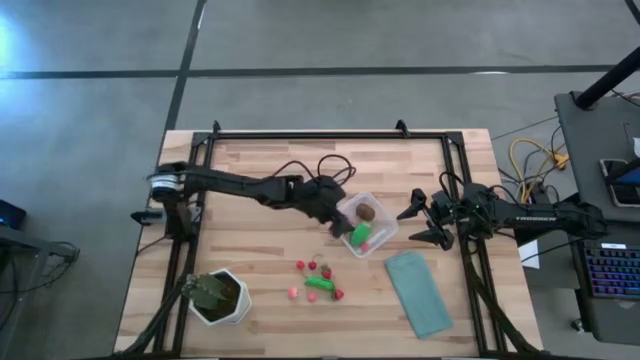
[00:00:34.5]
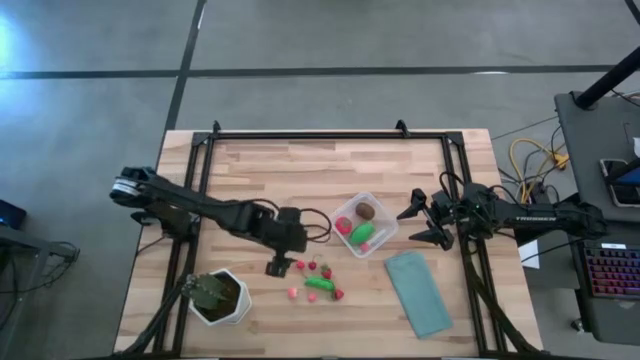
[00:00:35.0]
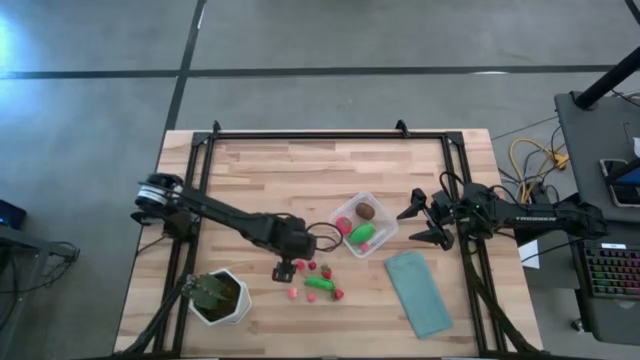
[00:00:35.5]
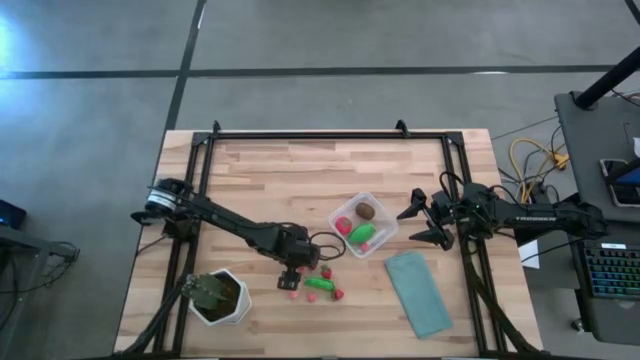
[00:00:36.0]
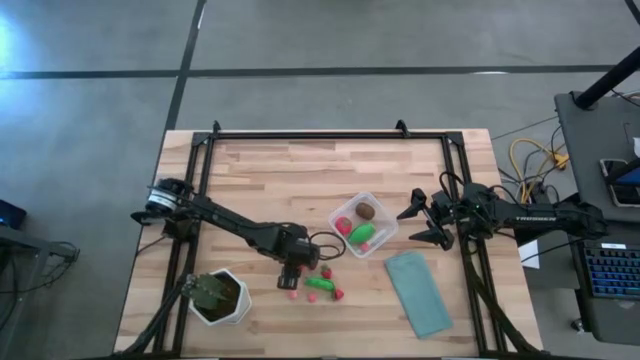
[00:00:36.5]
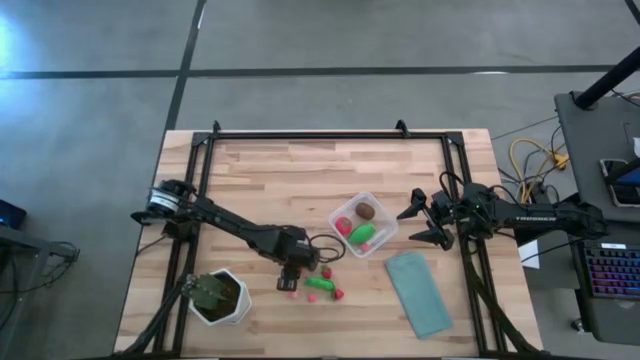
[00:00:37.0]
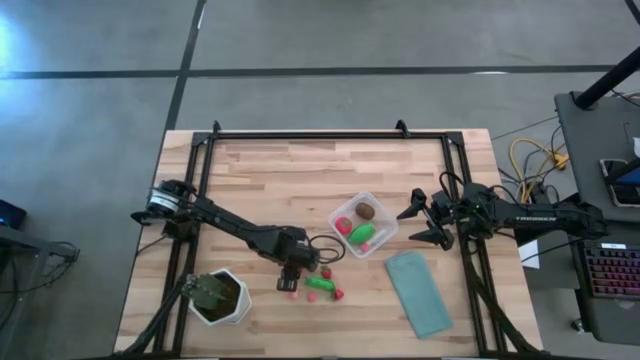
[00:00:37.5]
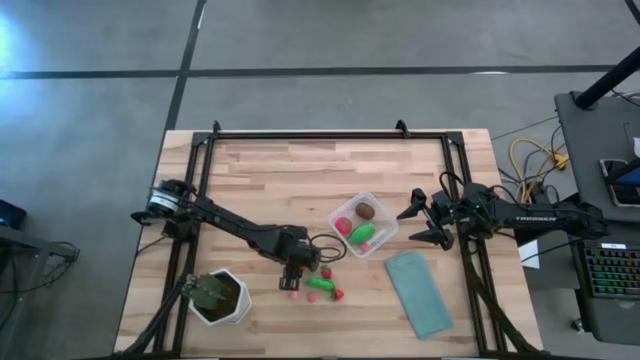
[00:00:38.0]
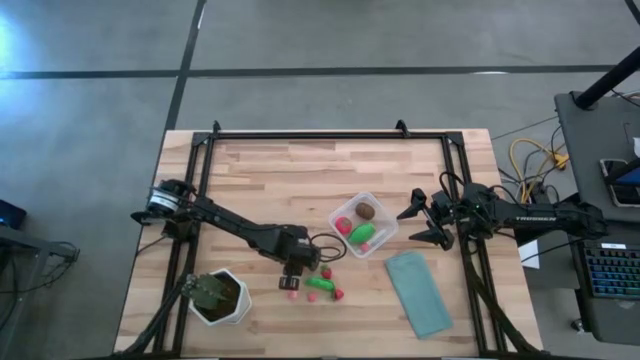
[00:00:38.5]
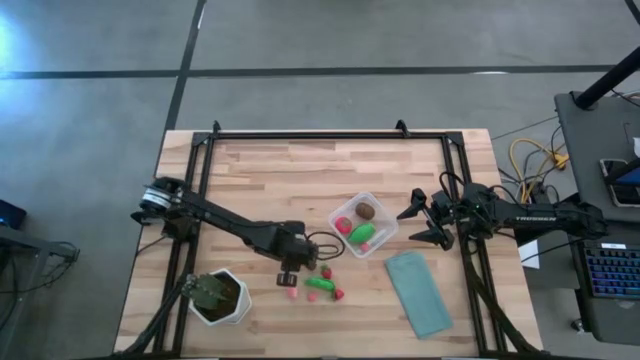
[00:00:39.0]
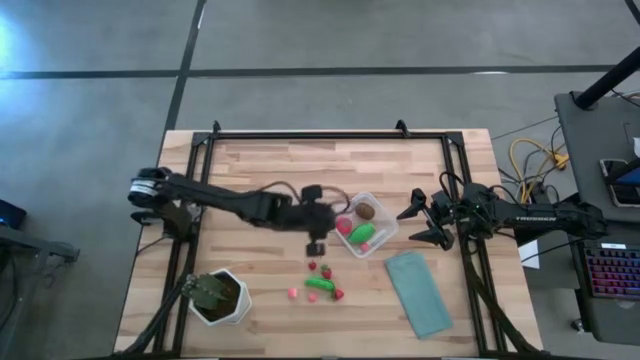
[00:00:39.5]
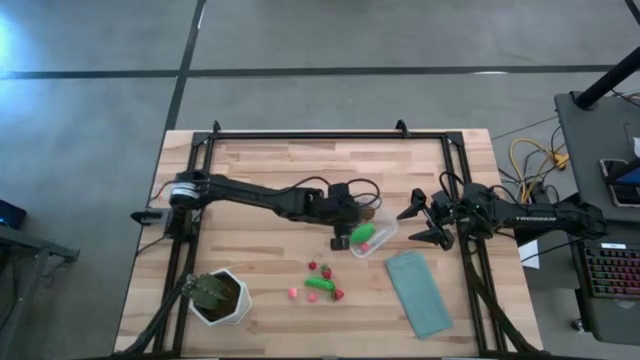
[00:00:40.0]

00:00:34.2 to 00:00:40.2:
Task: Pick and placing Produce into tupperware
Put the left red cherry into the transparent bin

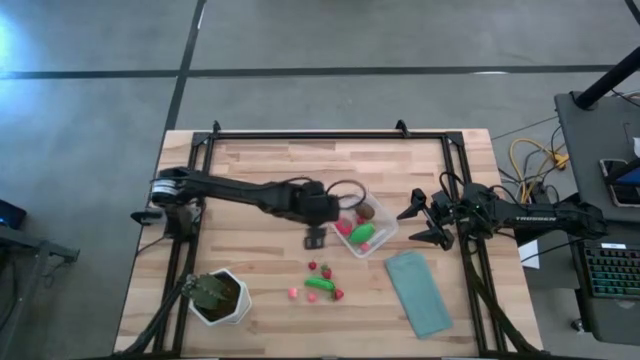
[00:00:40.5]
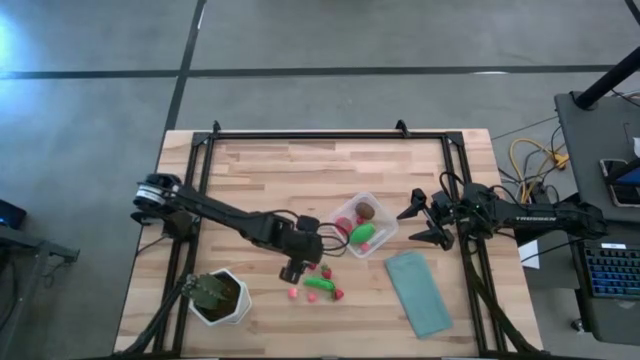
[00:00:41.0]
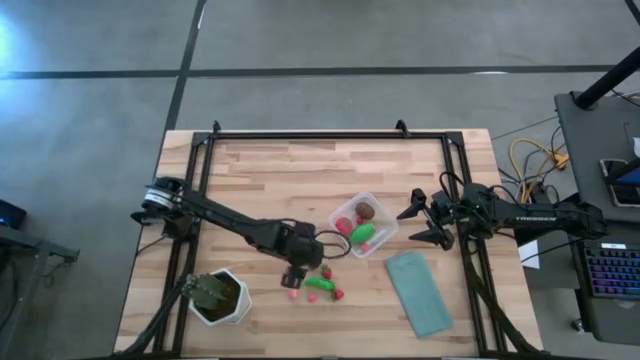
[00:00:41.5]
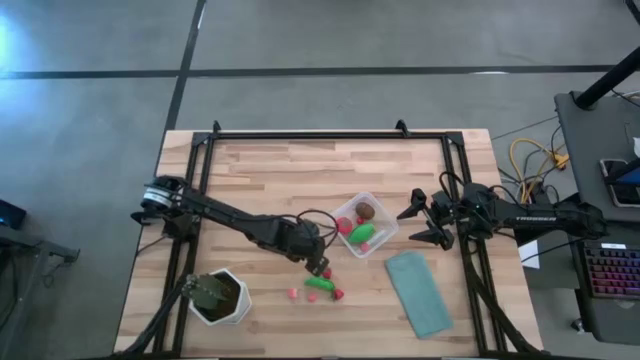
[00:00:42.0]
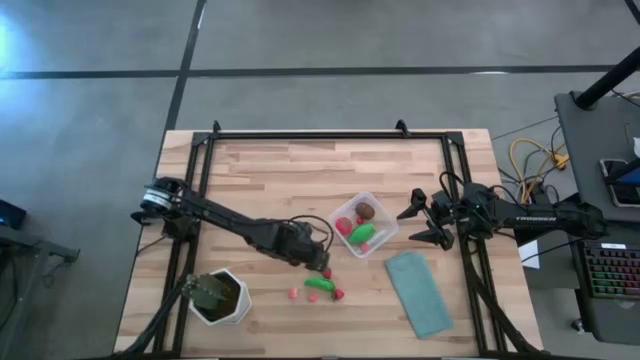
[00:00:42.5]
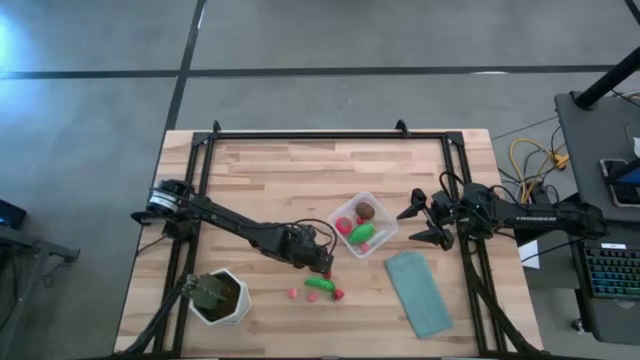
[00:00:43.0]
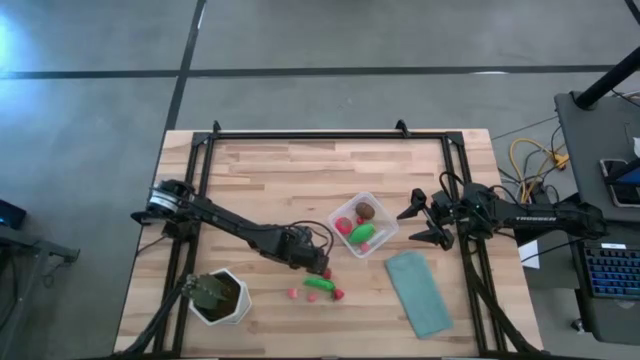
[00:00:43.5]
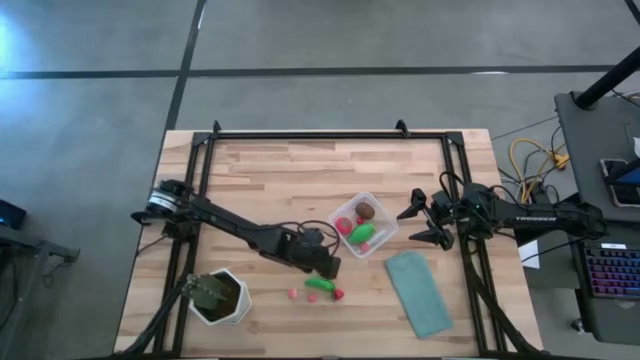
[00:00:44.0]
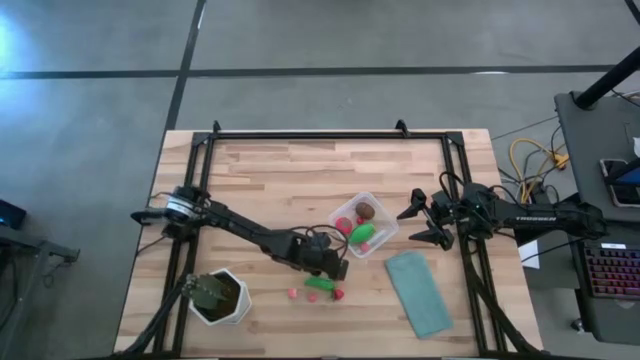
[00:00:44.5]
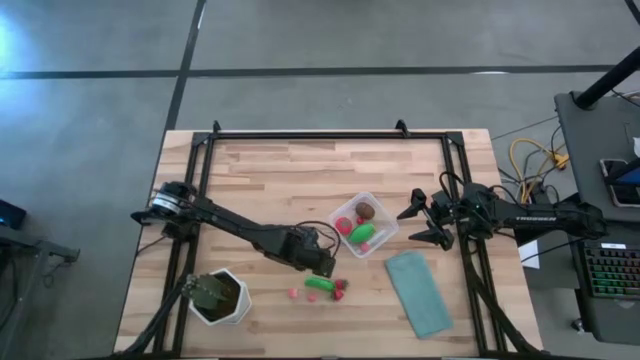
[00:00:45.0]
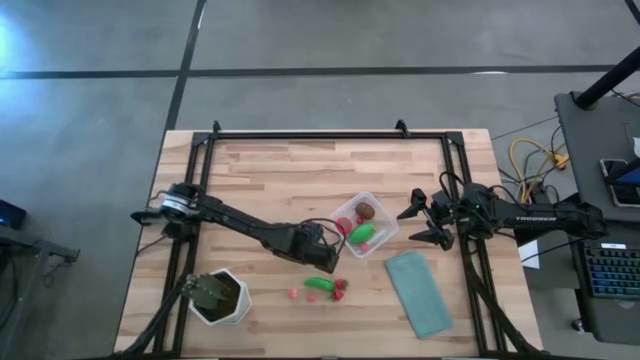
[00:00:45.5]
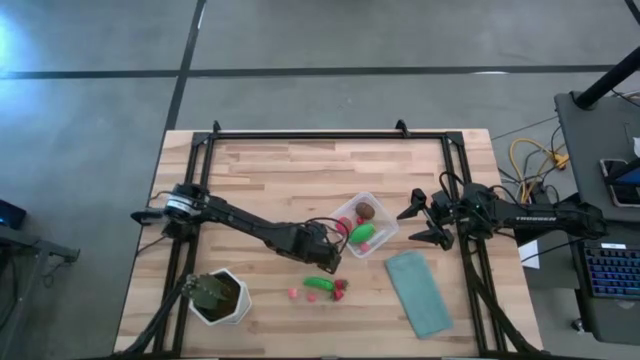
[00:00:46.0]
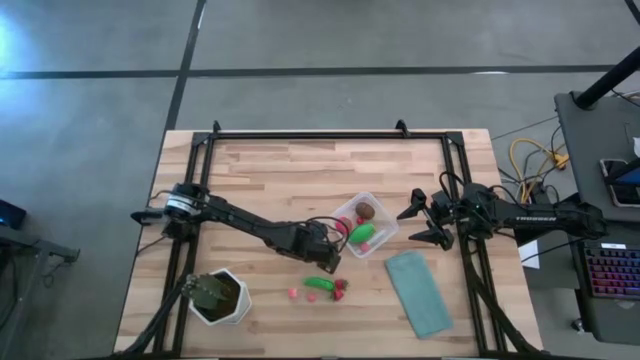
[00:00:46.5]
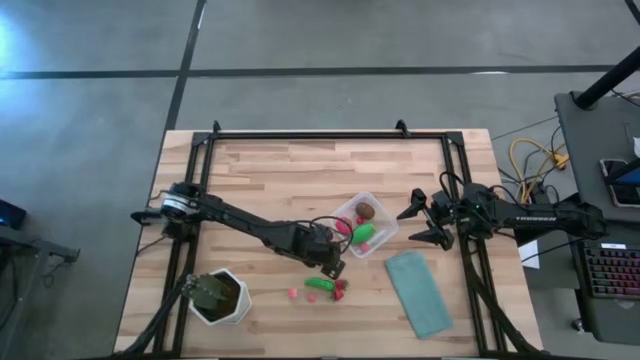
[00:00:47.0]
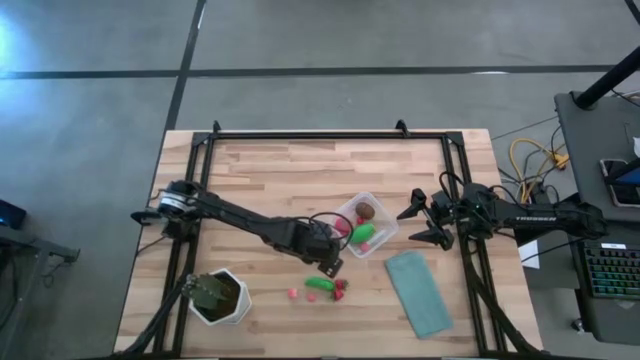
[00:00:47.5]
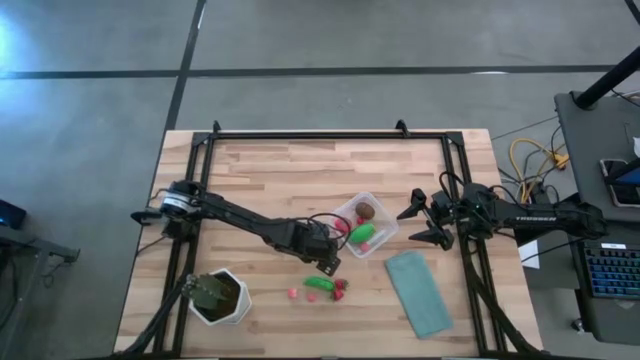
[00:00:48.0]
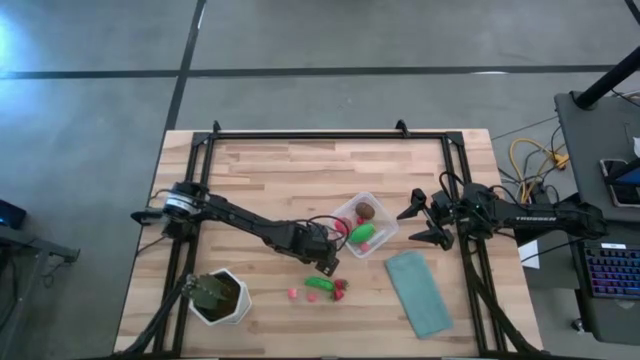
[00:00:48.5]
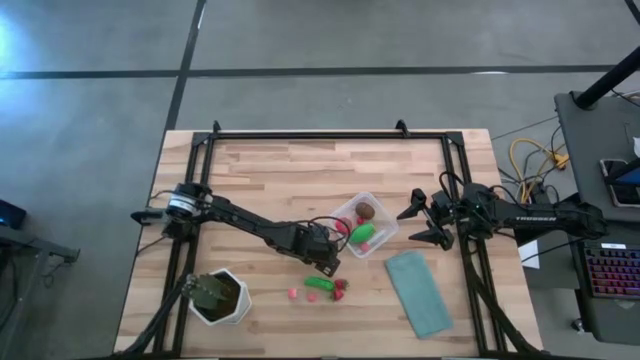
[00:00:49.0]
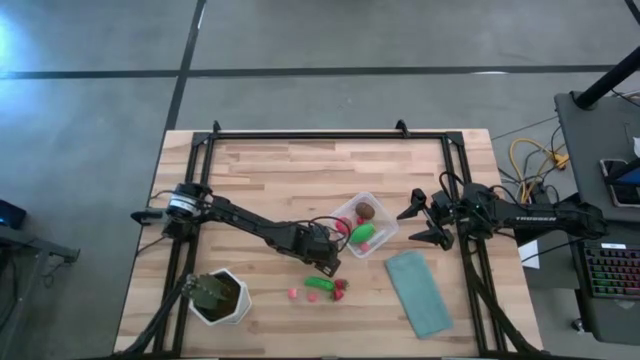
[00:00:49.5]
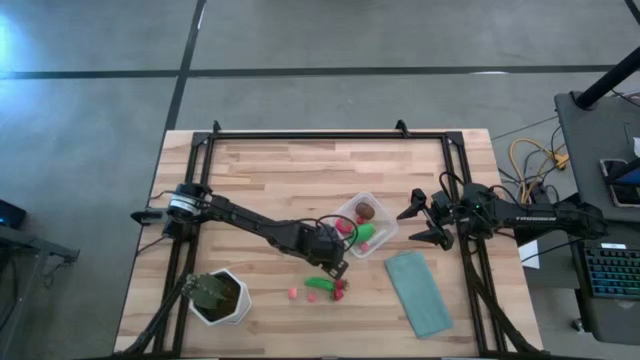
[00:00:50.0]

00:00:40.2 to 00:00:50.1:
Put the red cherry into the transparent bin

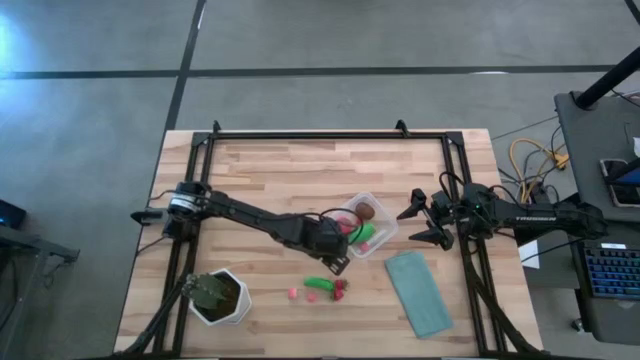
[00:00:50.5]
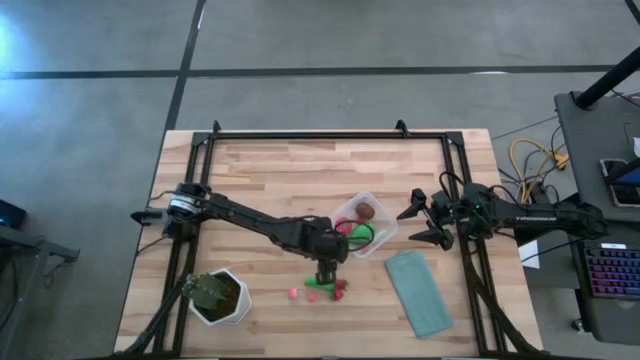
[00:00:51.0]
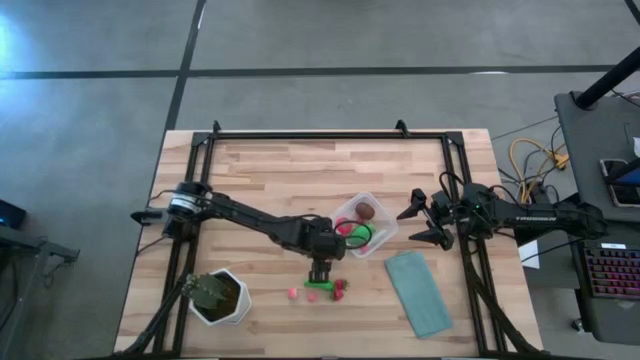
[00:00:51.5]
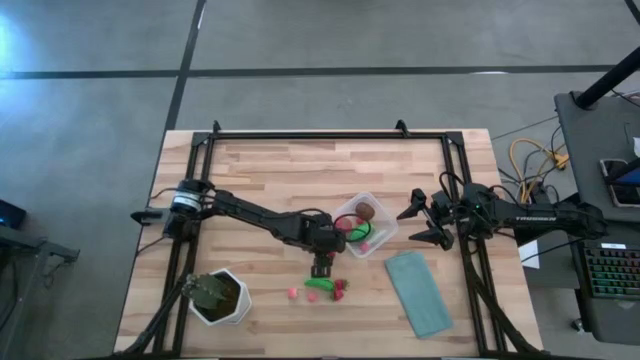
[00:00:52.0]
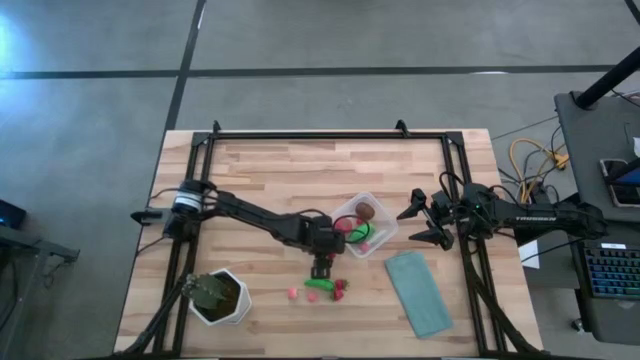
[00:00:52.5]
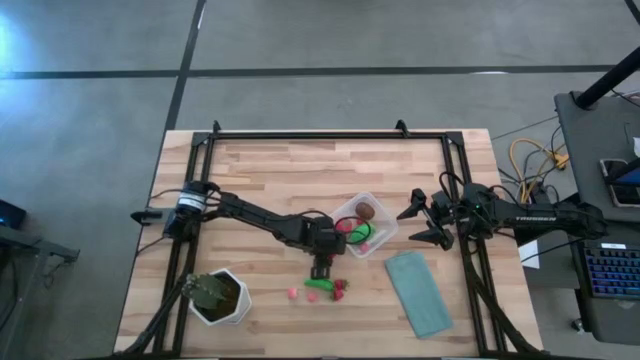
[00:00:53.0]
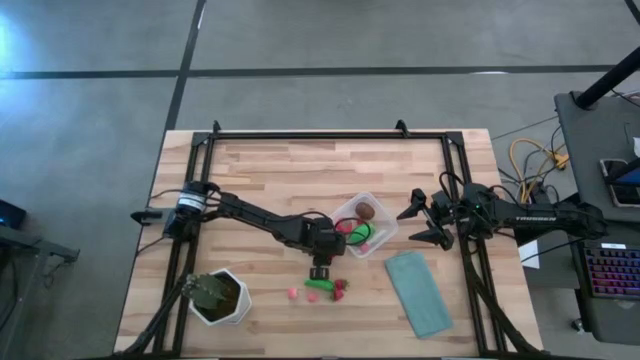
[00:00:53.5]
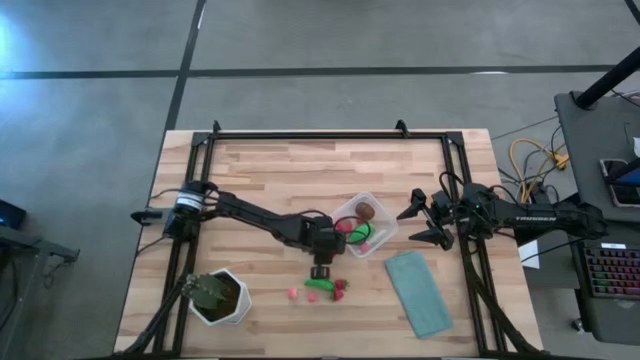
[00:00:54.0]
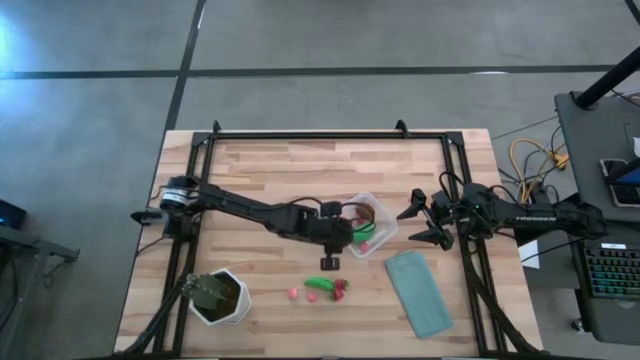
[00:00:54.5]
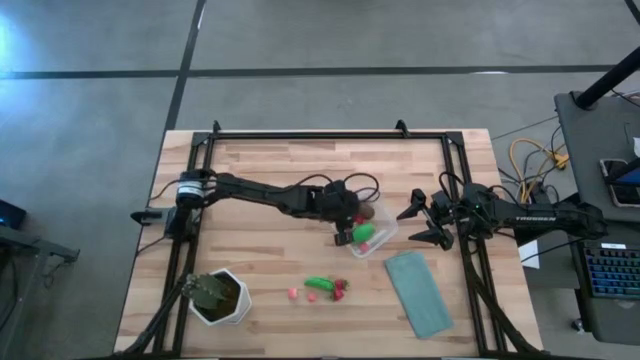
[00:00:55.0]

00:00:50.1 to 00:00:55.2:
Put the red cherry into the transparent bin
